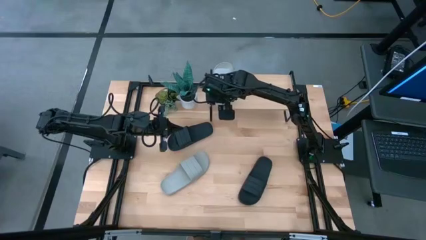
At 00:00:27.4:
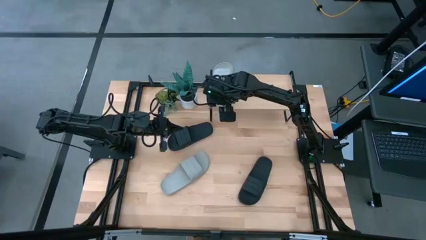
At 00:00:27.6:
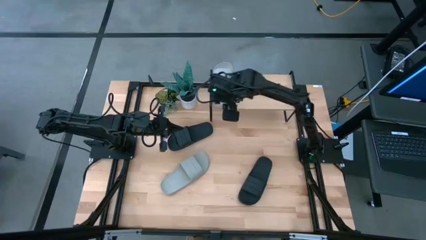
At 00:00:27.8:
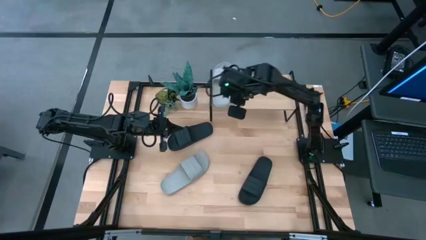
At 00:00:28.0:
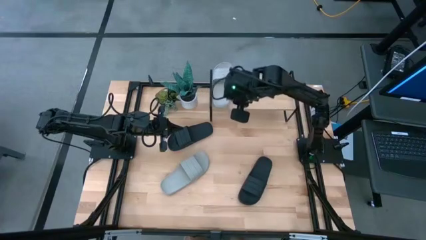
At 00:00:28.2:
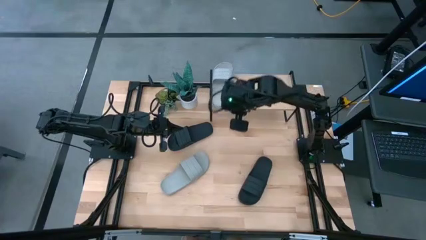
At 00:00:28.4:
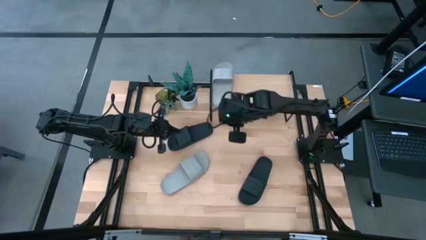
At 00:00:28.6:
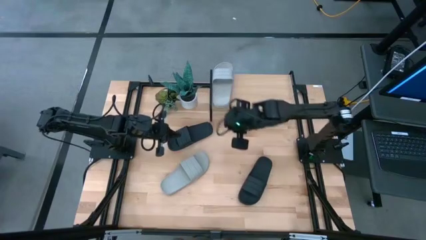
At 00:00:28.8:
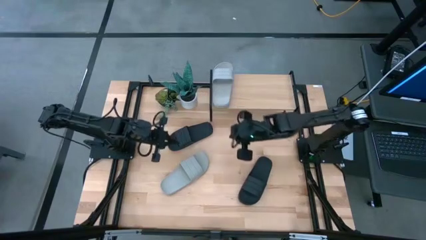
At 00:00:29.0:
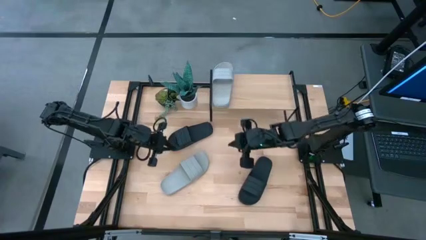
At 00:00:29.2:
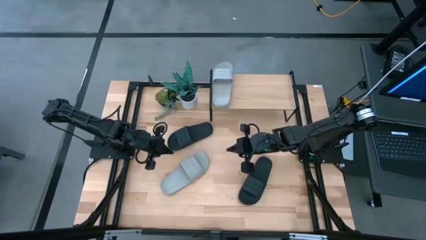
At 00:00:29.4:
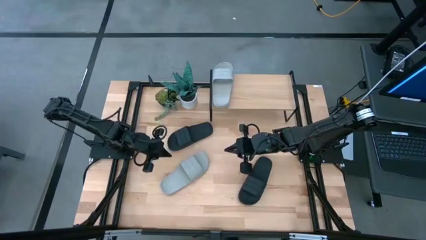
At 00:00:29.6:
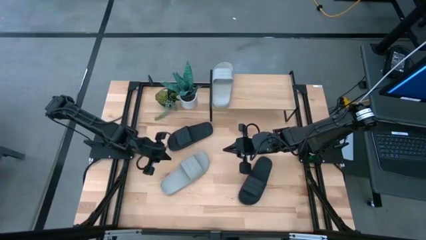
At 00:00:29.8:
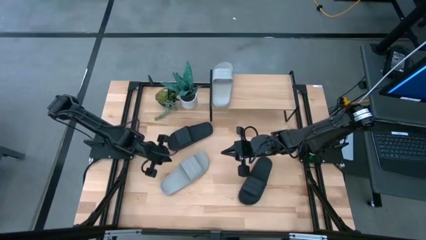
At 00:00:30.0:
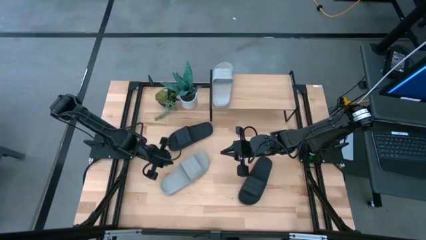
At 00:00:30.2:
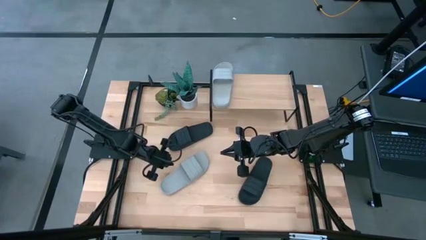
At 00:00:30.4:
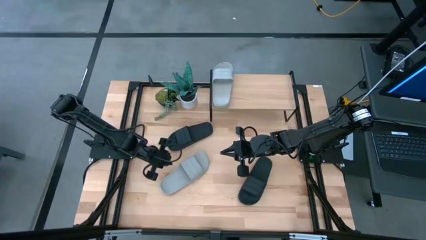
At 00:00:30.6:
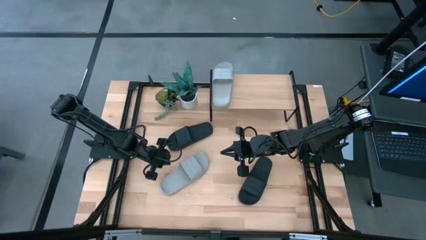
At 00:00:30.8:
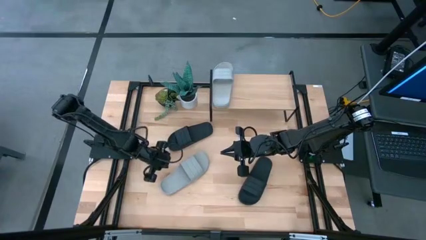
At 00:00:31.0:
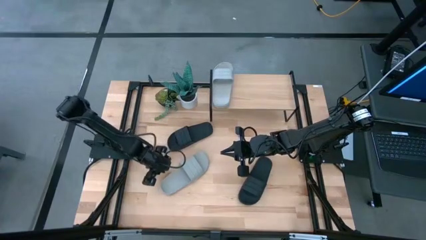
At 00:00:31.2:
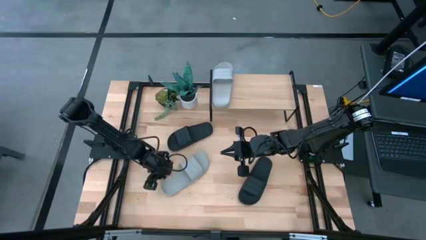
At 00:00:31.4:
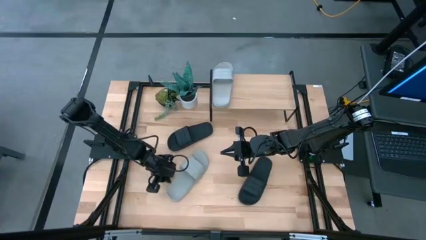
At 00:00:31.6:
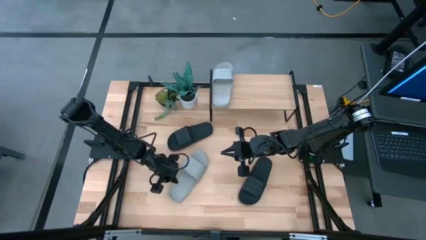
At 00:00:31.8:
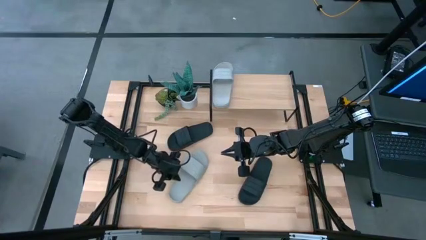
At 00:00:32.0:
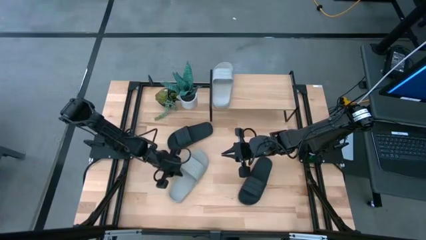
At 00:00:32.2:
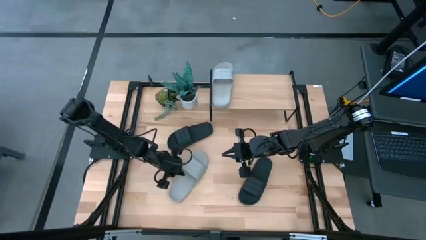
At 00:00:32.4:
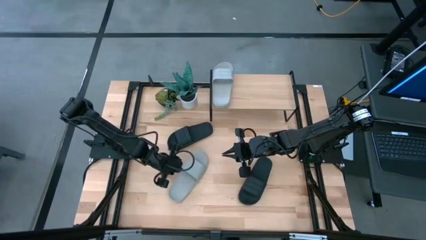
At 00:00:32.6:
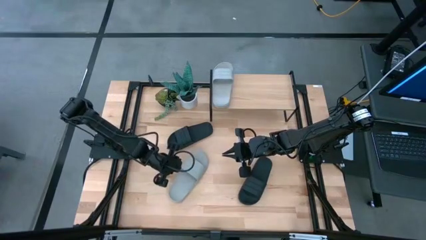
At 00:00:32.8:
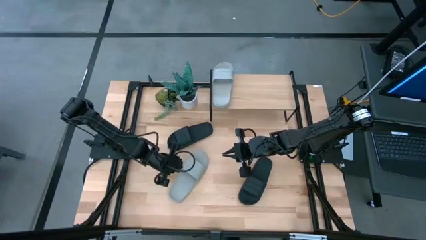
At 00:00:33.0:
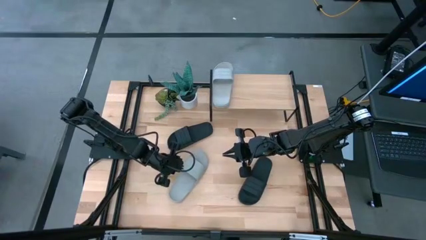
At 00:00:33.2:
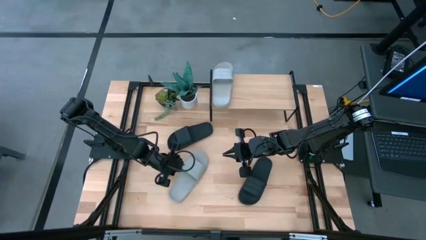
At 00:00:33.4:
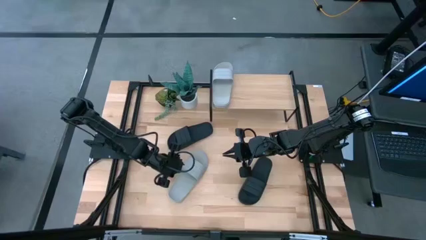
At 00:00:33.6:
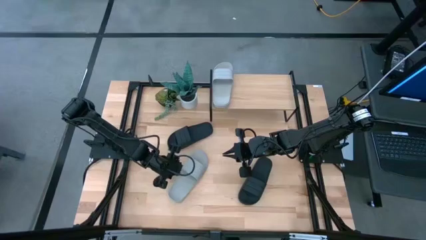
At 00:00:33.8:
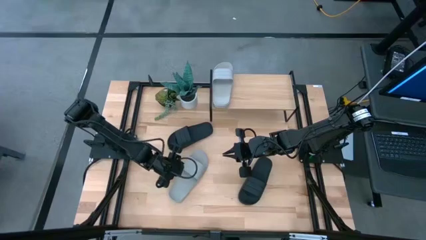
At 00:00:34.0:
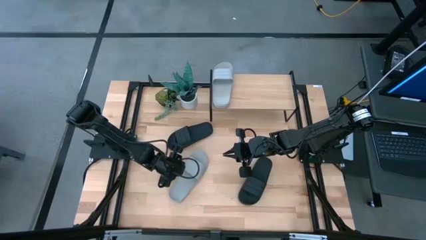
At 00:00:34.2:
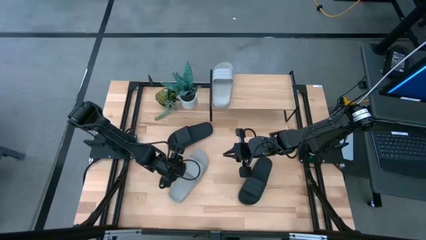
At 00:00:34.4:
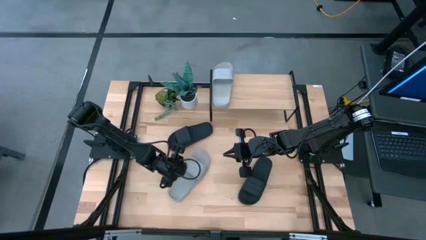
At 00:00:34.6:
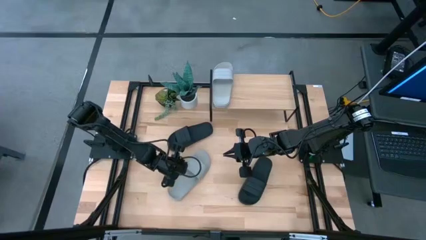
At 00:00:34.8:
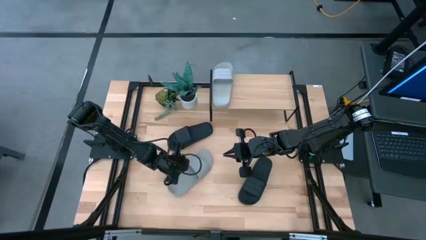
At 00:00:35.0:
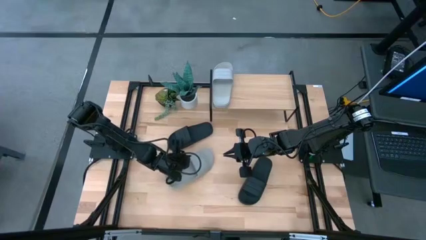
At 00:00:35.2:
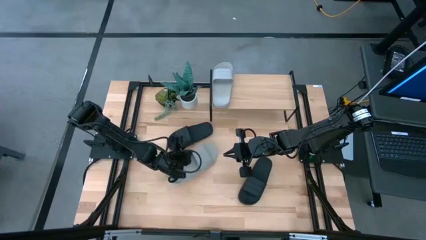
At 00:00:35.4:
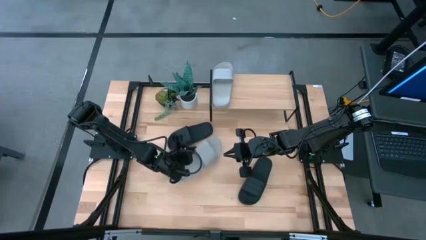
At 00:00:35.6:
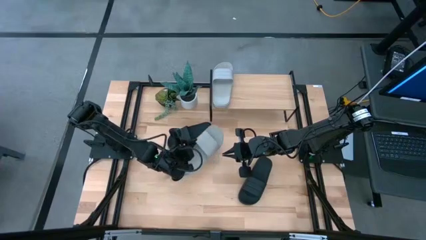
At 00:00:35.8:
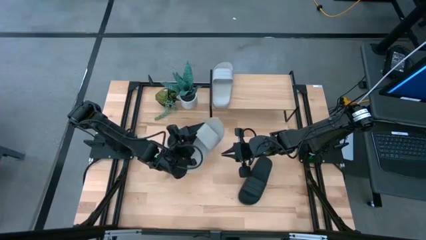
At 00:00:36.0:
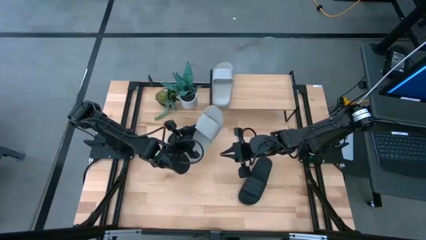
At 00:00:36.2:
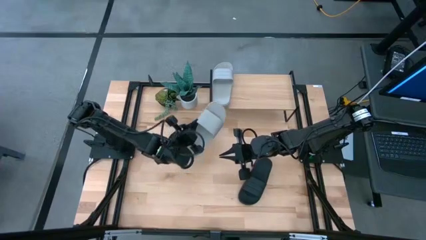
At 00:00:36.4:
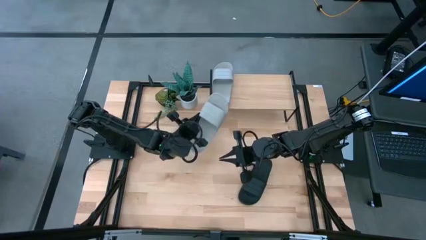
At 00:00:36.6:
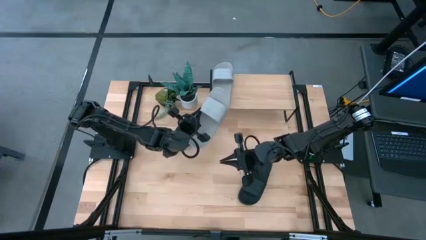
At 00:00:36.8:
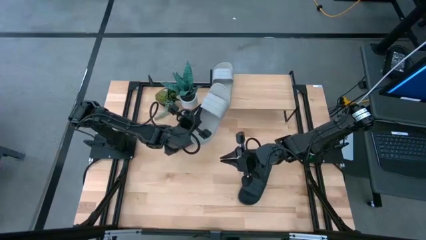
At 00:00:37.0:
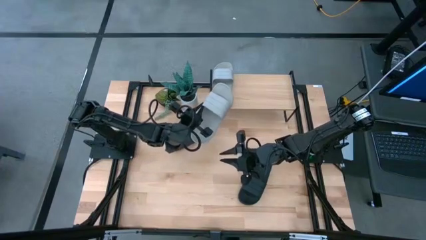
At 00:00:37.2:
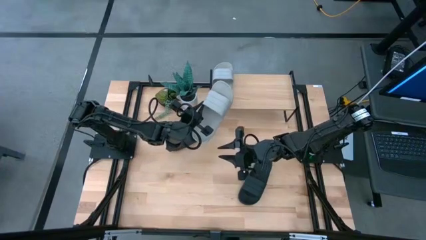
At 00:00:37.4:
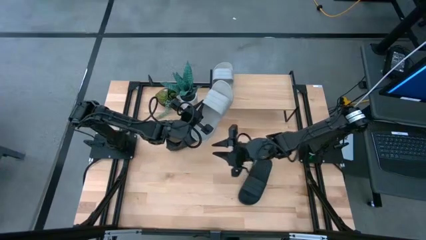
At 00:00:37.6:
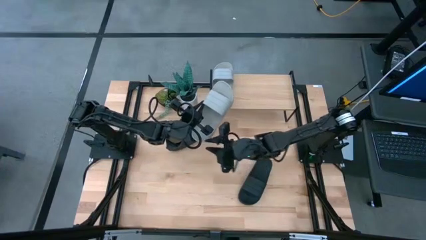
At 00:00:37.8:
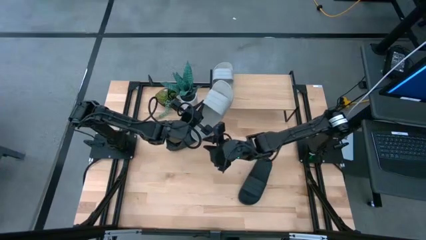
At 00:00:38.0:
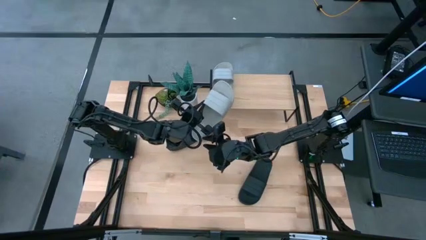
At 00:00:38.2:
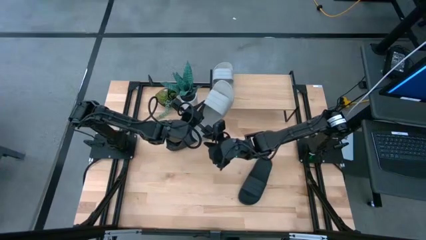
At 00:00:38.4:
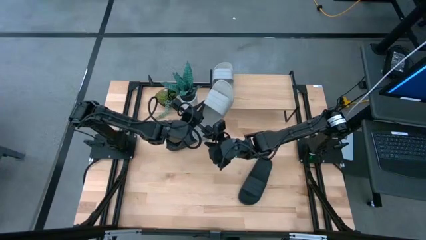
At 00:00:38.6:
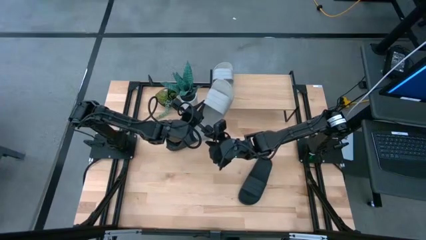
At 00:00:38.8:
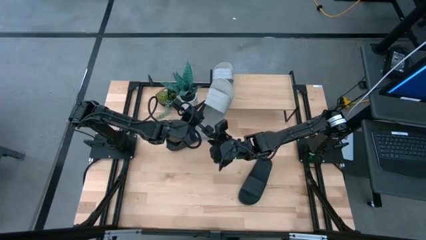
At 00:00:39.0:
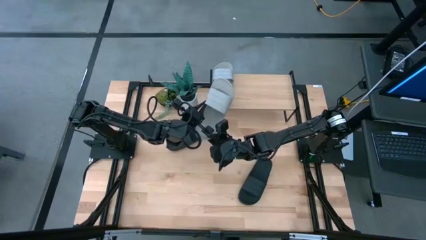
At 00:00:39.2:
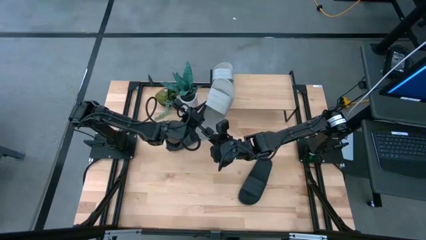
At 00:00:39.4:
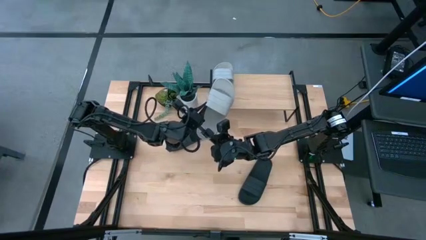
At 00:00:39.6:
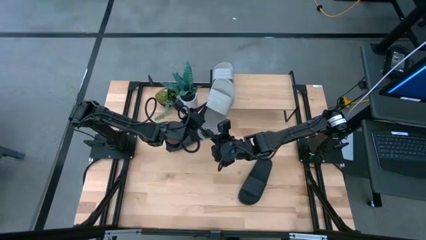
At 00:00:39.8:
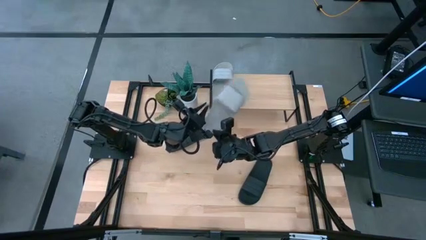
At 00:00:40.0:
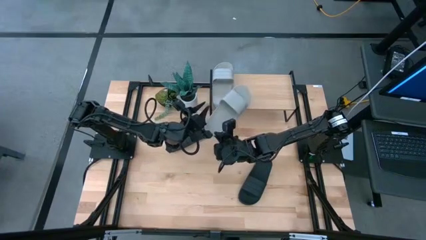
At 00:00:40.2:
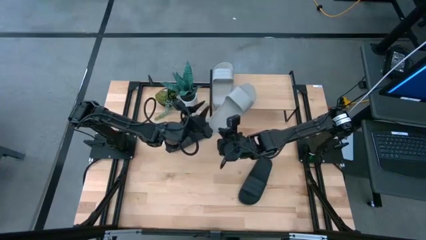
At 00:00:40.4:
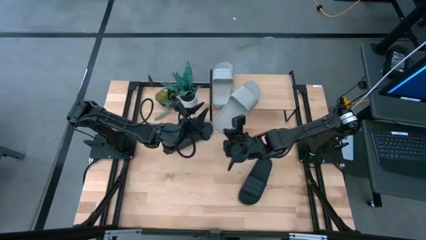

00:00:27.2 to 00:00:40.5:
Task: Pick and place slides into the shelf
Put the gray slipper on the shelf

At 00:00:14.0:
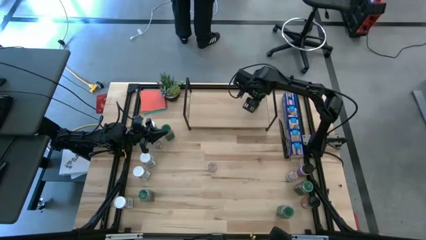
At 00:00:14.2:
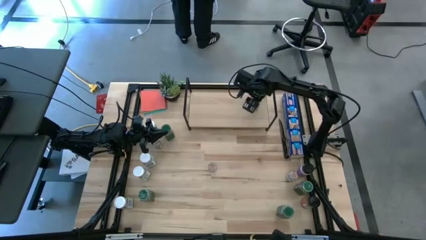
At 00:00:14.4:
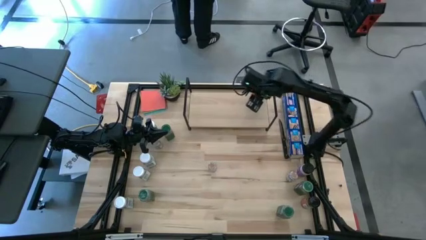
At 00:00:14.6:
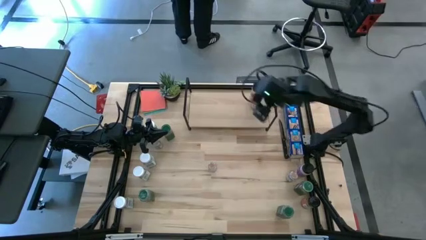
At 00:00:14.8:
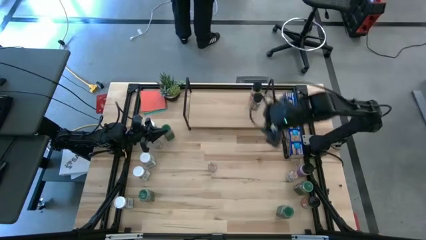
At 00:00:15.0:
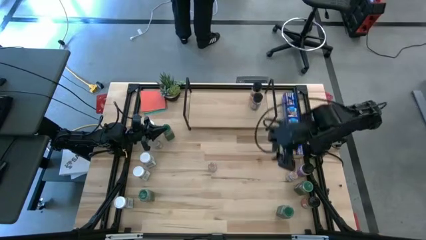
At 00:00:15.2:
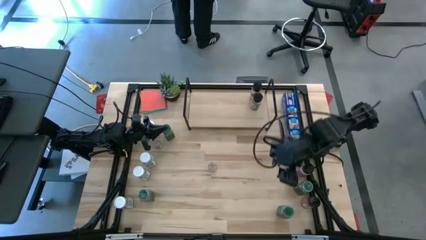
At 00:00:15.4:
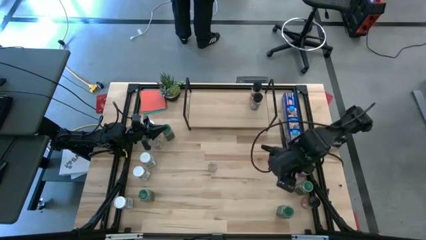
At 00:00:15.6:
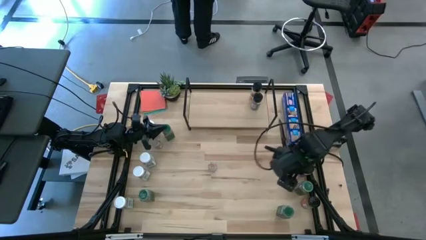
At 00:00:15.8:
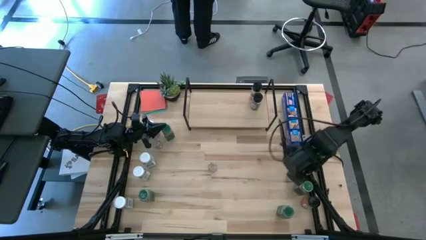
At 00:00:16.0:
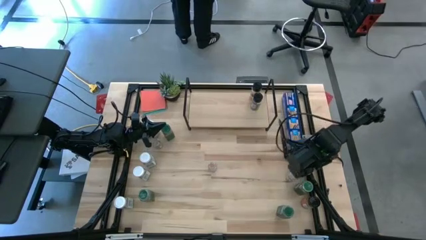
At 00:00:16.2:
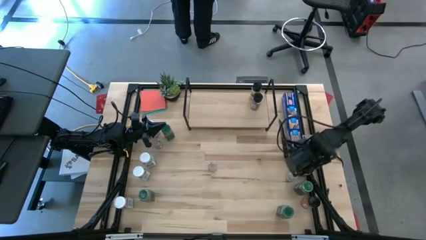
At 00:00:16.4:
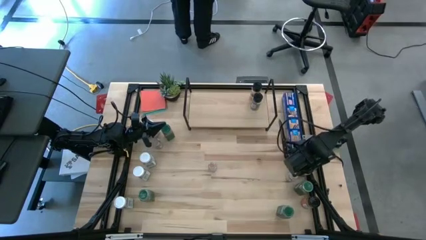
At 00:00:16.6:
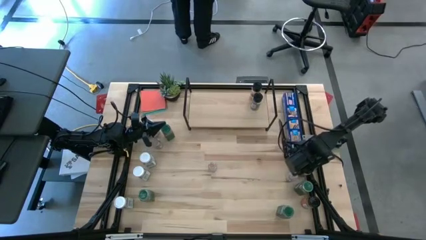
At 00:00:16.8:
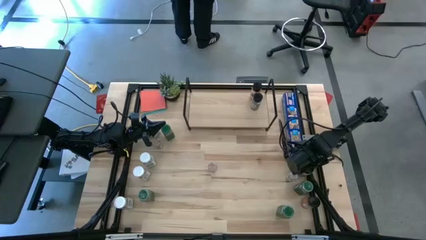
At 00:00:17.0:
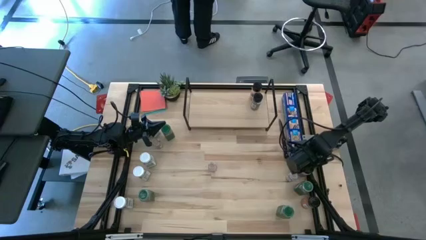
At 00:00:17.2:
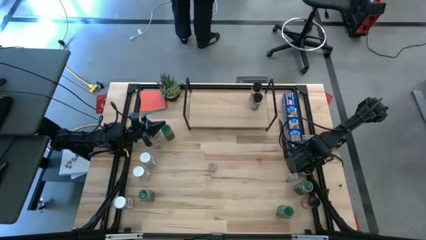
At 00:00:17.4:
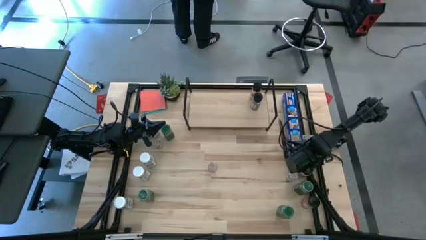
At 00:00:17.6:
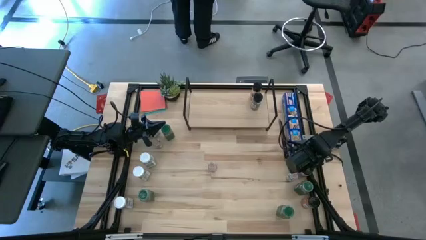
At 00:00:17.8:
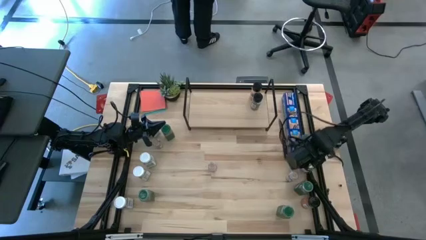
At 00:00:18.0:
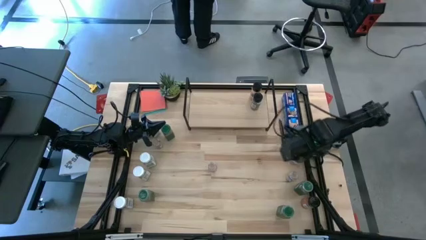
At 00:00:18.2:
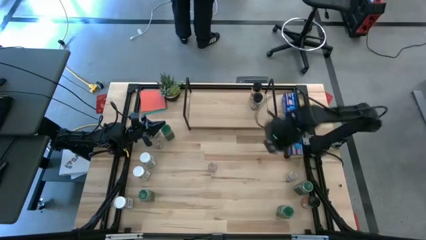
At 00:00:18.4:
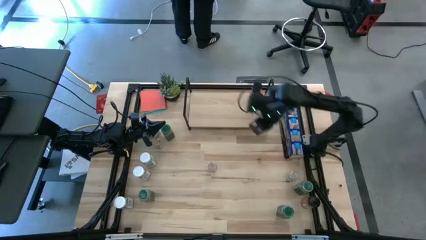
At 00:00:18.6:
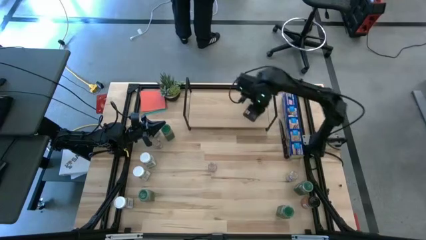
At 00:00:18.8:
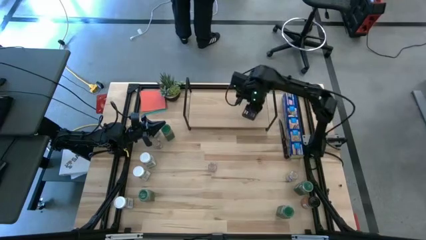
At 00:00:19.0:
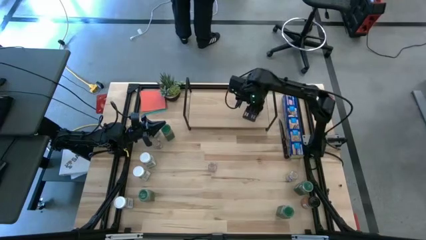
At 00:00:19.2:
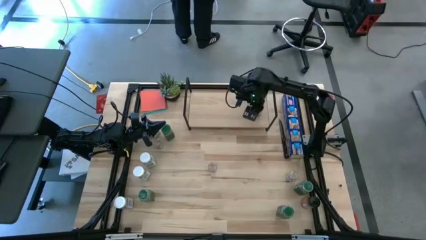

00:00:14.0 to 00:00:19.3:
Task: Shelf spices
Put the black purple seasoning bottle on the shelf, aligned with the black green seasoning bottle
